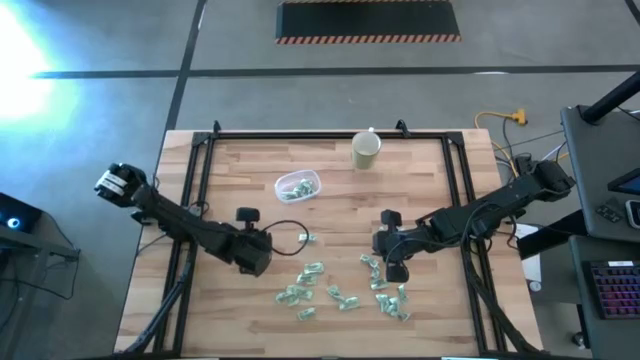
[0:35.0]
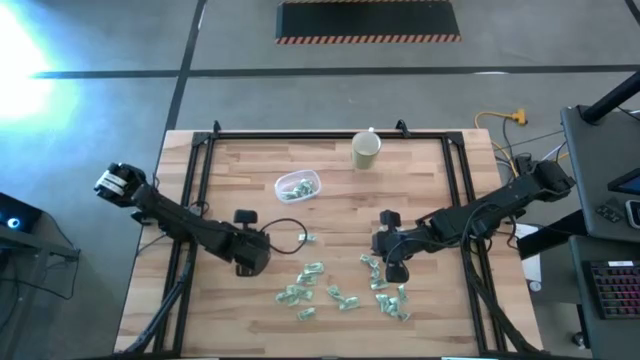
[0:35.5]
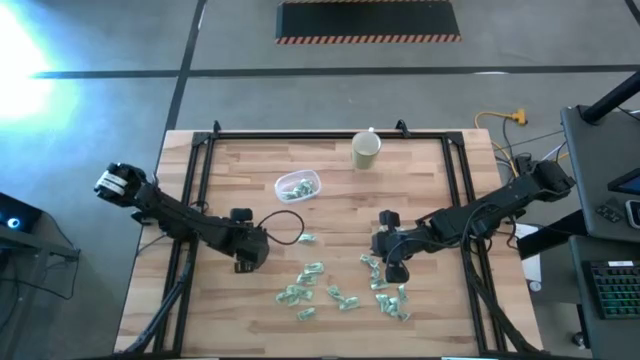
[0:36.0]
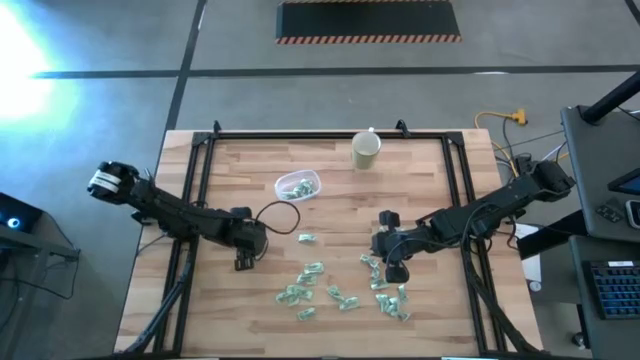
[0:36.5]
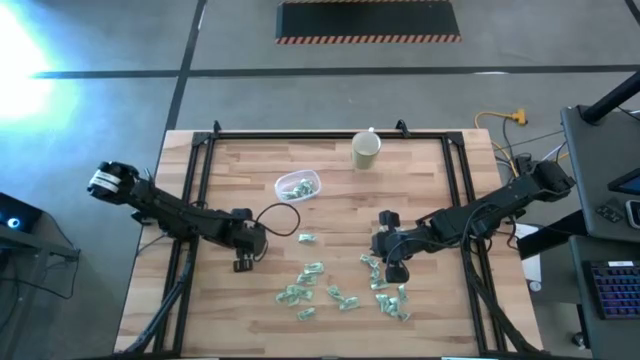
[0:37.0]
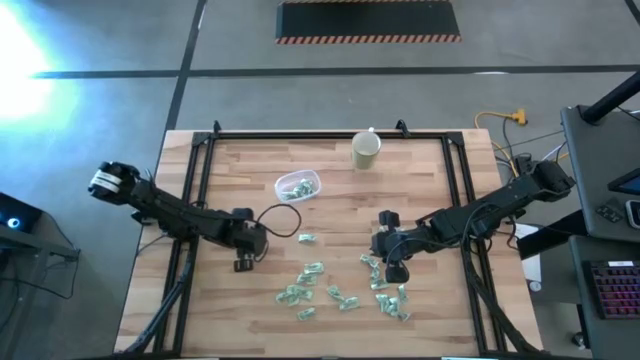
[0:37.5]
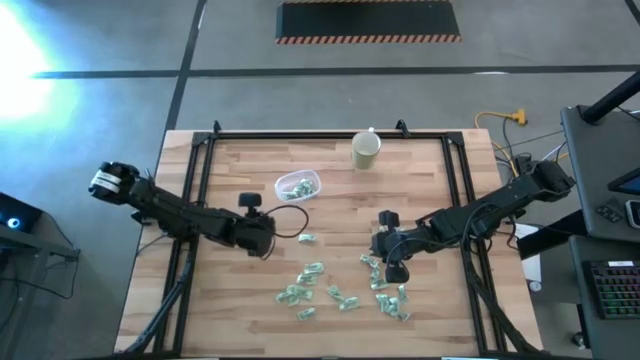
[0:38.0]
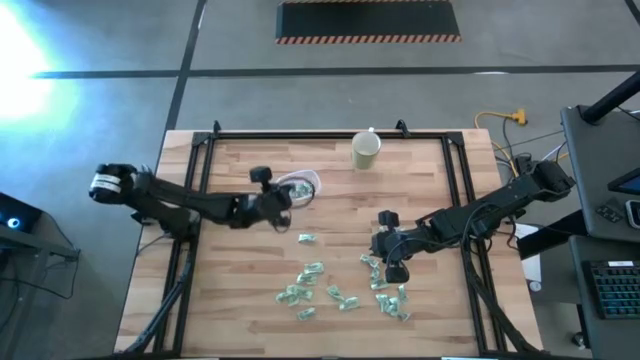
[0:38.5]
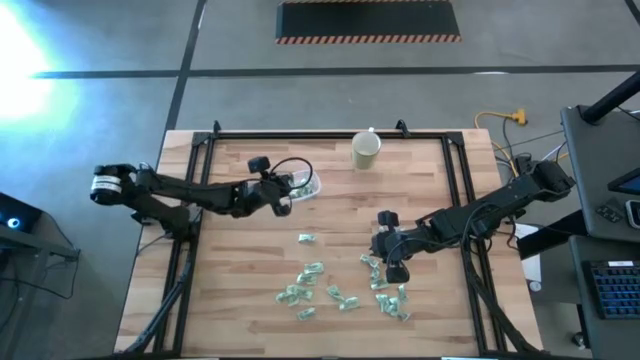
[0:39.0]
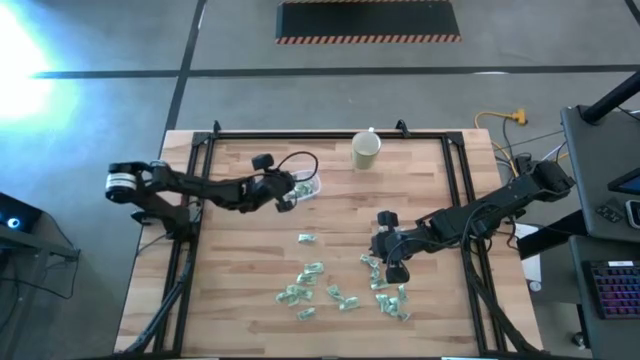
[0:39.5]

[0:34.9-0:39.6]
Task: Pick and place Stevia / Truvia into bins
Put the stevia packet into the transparent container

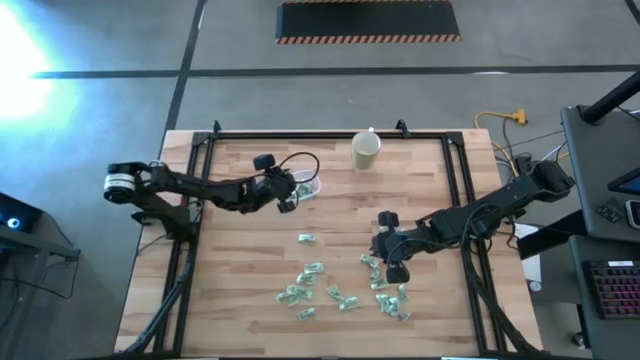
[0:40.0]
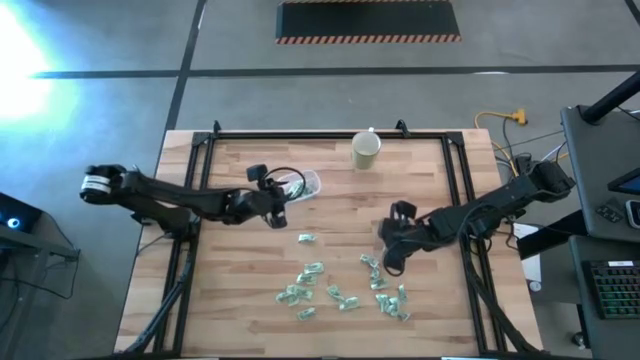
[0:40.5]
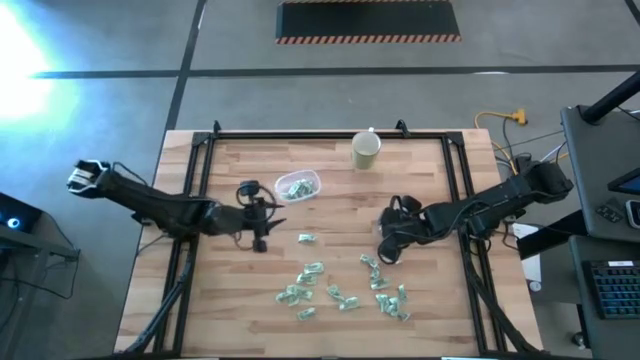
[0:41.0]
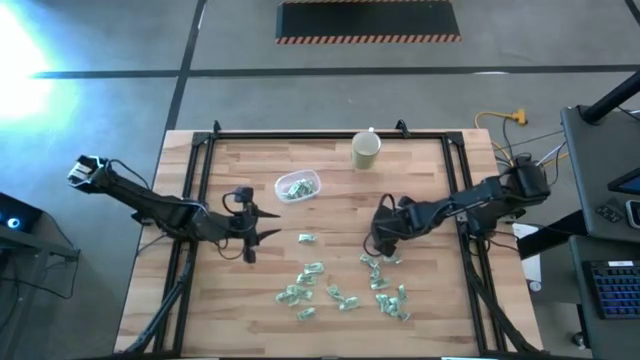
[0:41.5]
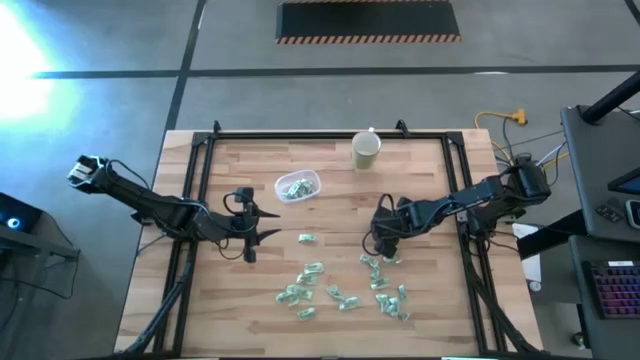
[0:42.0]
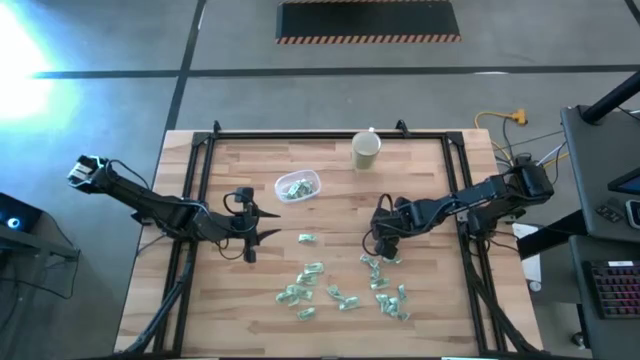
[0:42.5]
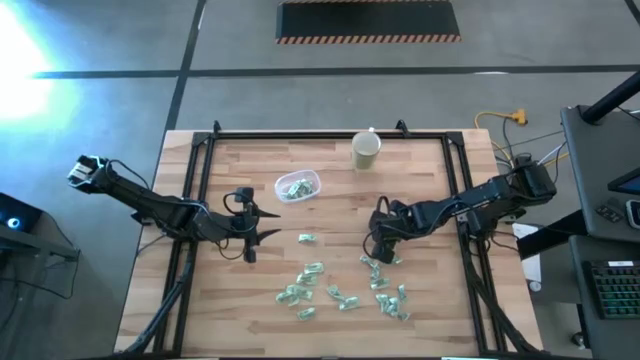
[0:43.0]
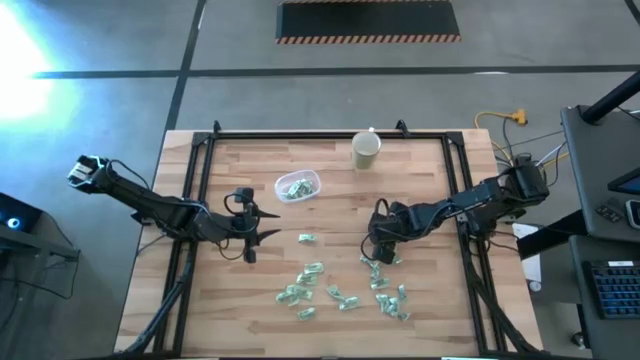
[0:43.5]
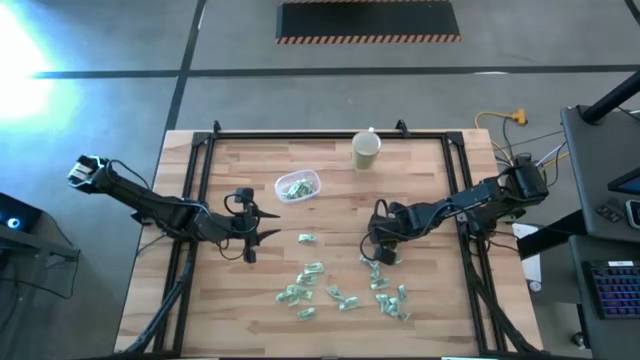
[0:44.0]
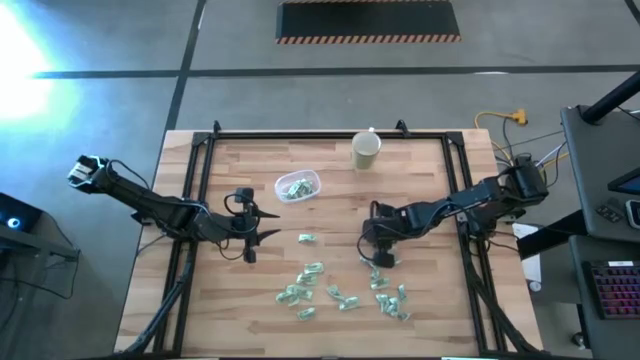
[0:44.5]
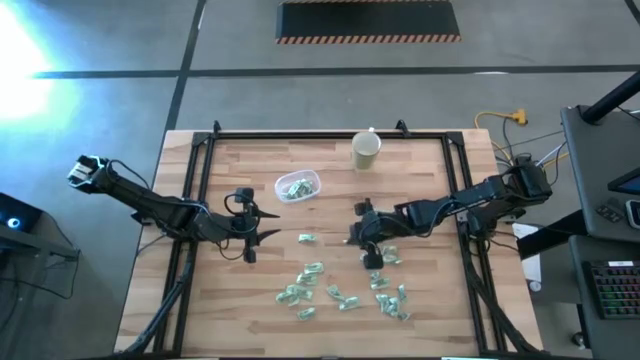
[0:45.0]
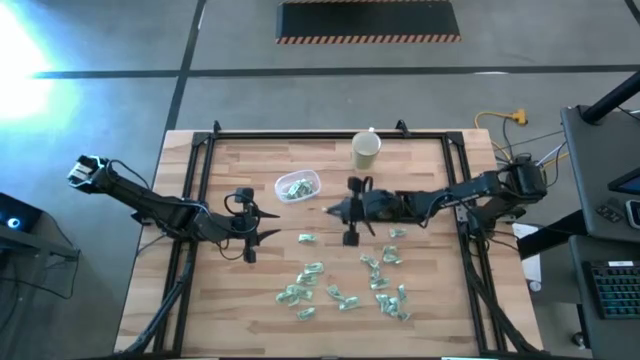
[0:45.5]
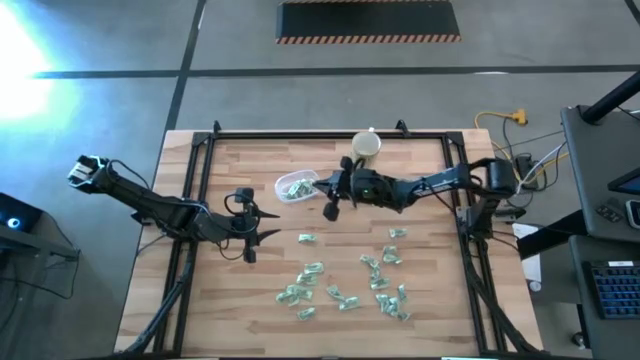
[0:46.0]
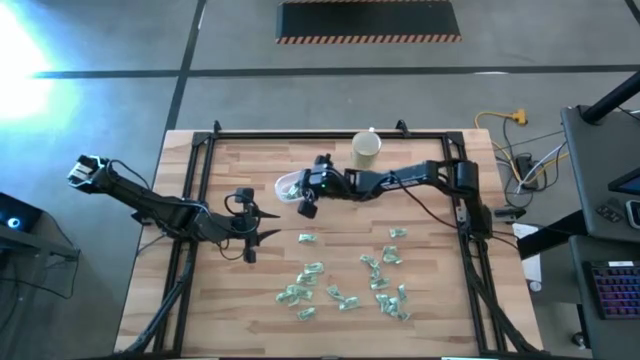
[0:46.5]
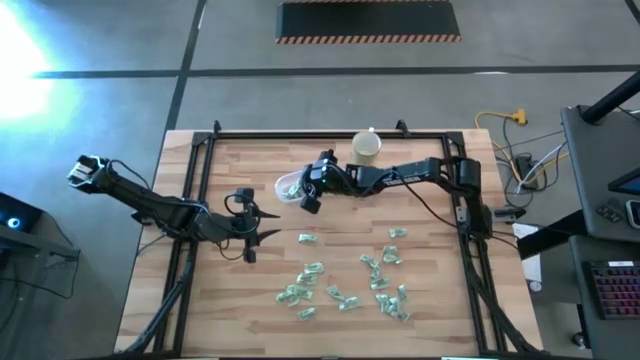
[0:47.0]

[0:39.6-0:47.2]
Put the stevia packet into the transparent container

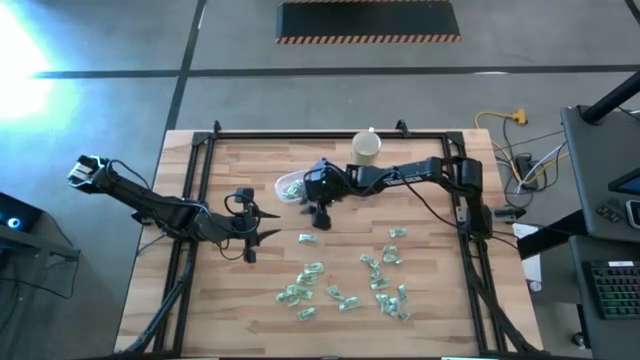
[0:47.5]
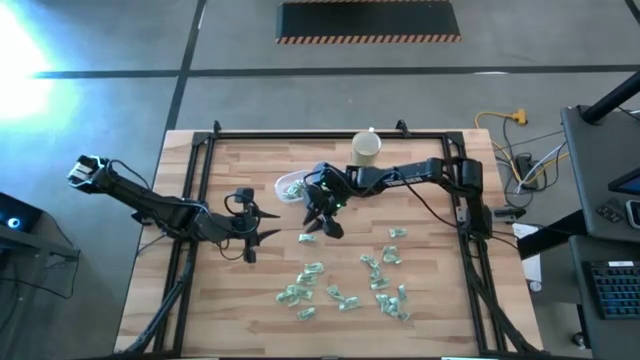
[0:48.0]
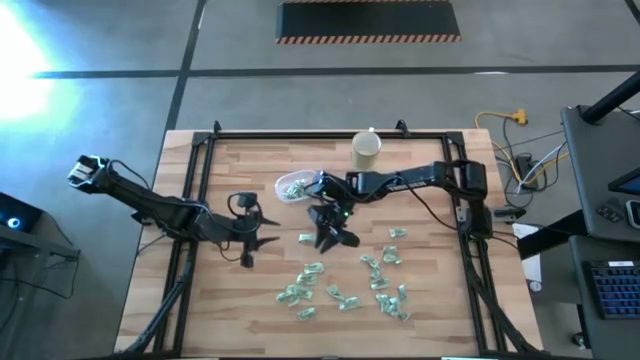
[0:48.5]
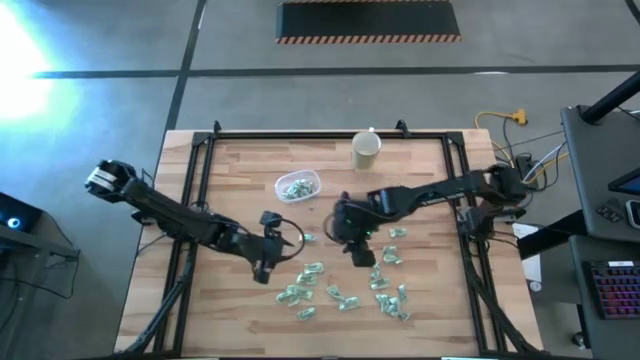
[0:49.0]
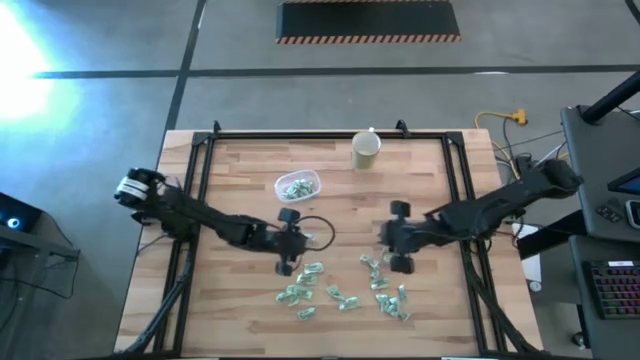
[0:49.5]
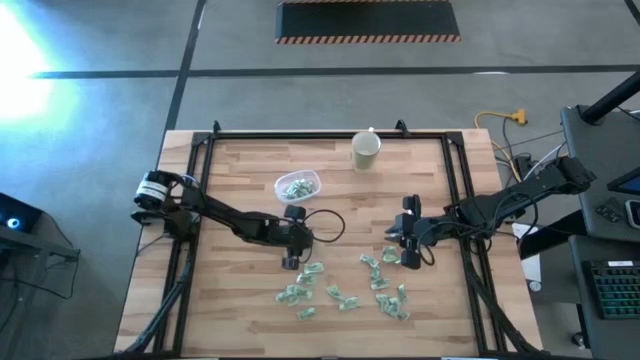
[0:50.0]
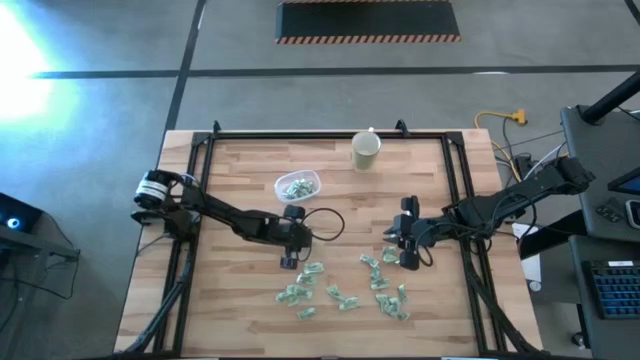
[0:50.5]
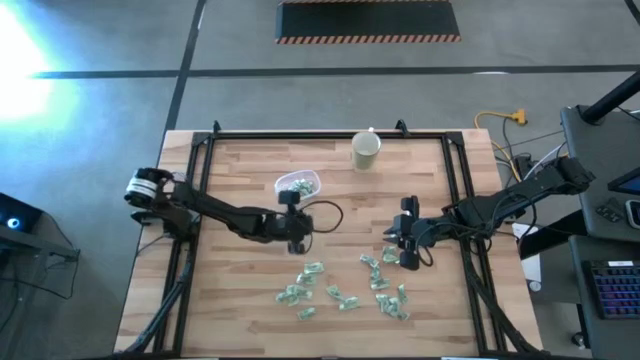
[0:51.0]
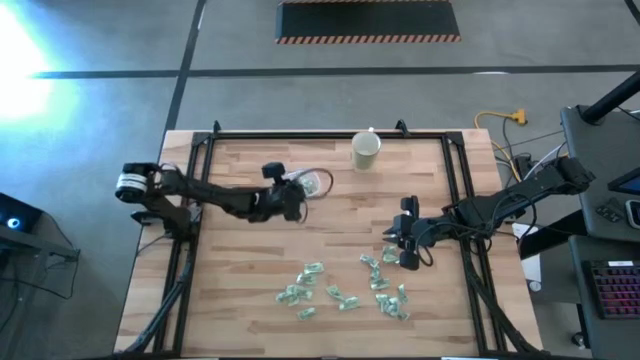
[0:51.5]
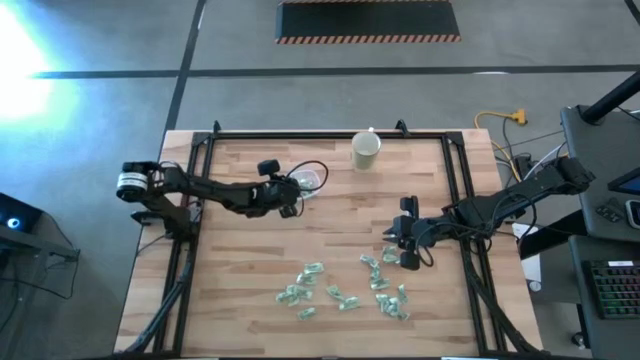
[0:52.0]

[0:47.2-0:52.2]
Put the stevia packet into the transparent container

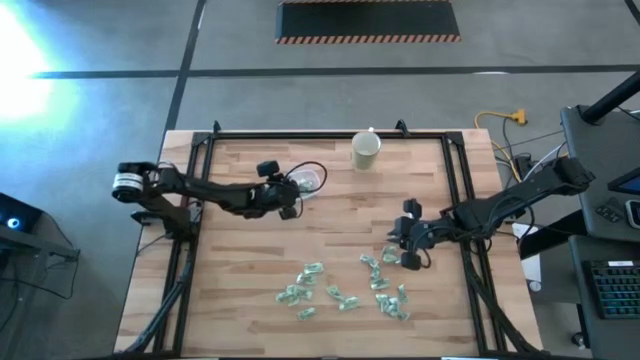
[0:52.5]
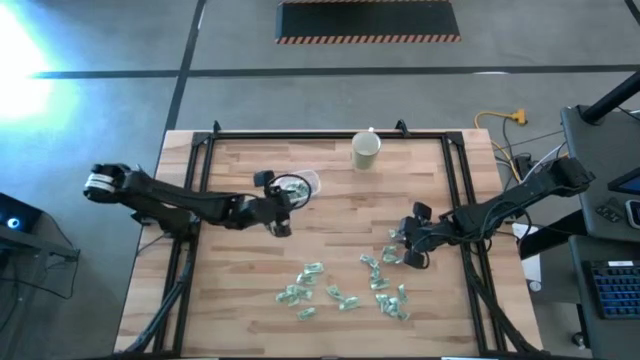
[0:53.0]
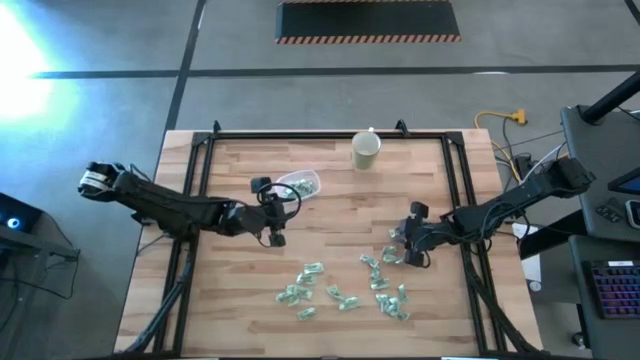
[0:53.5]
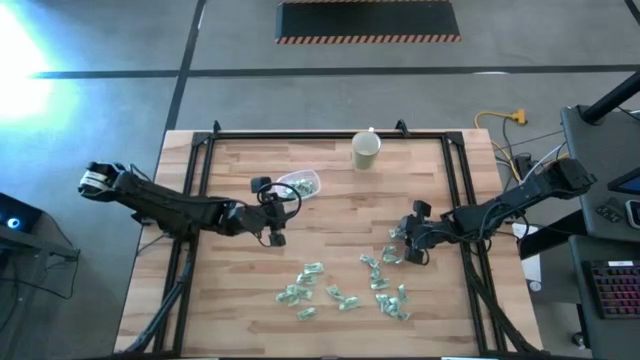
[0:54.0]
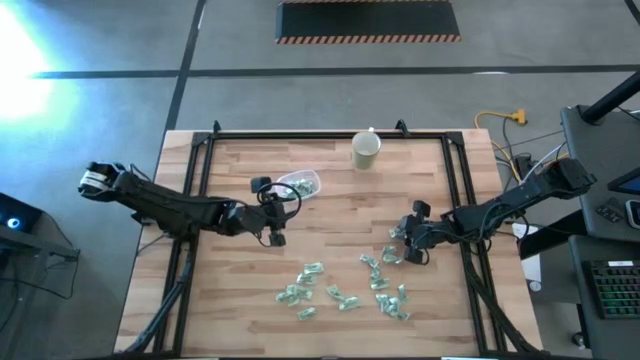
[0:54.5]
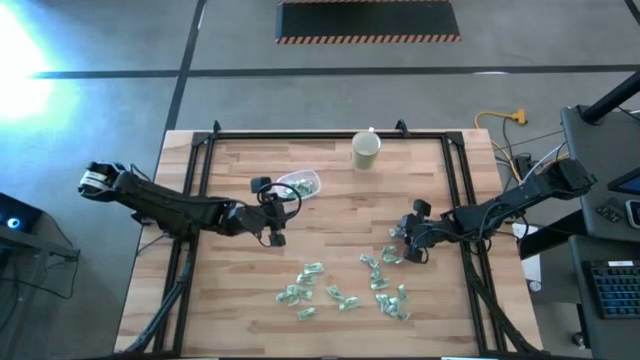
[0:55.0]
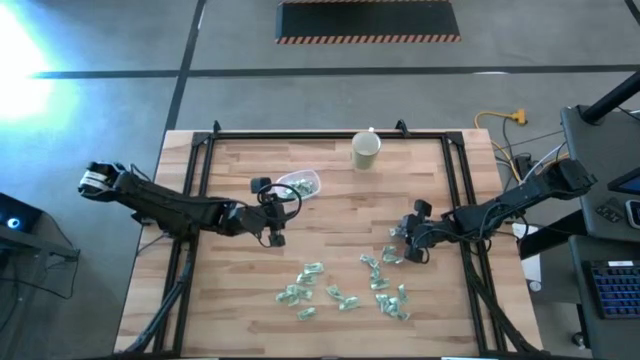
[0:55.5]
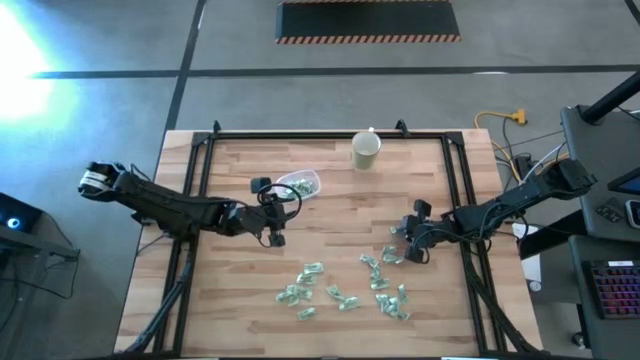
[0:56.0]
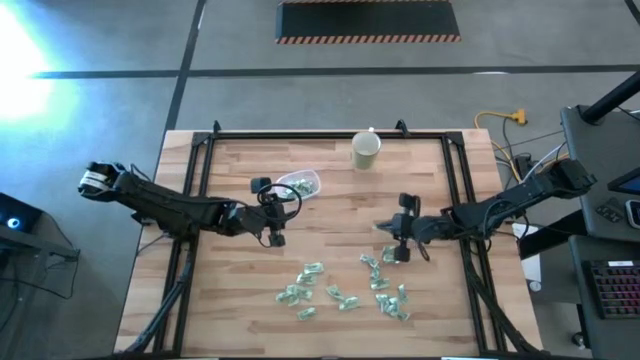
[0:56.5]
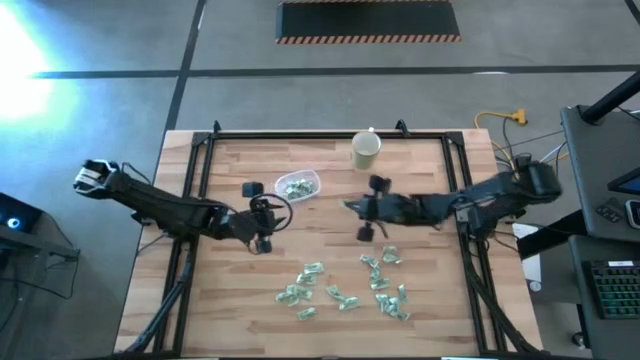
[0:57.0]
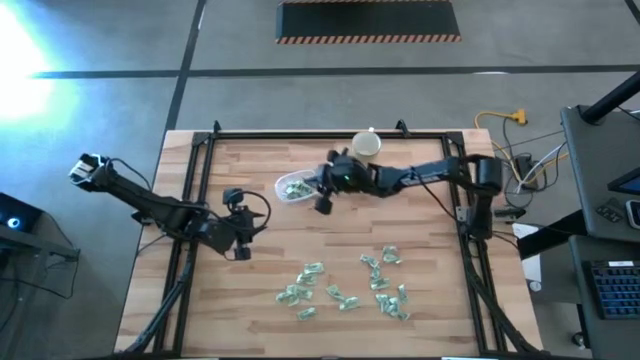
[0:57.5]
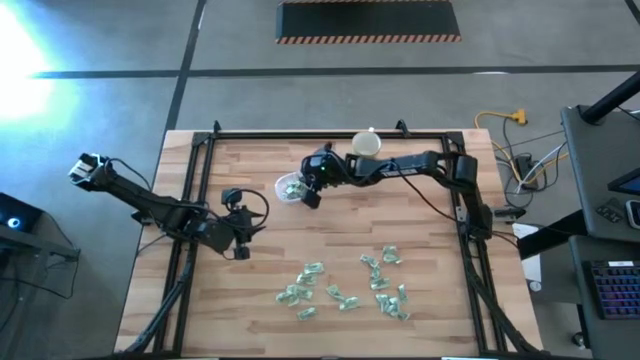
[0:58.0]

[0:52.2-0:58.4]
Put the stevia packet into the transparent container
